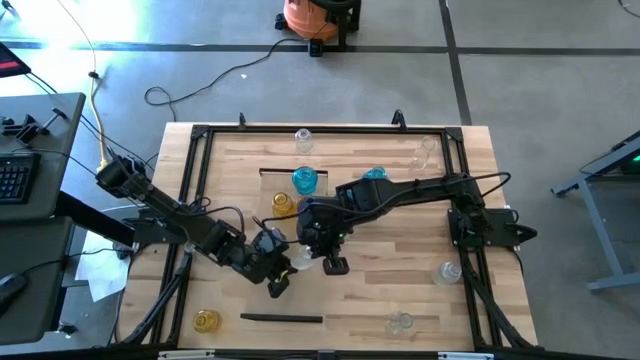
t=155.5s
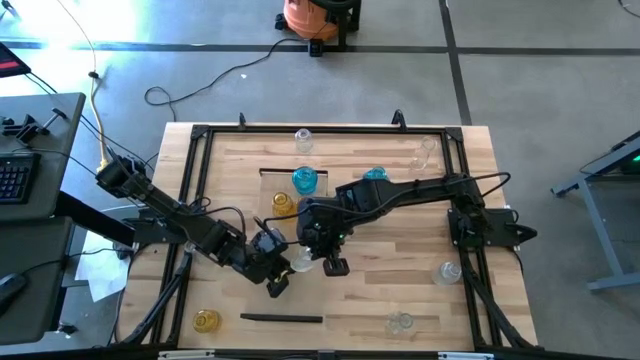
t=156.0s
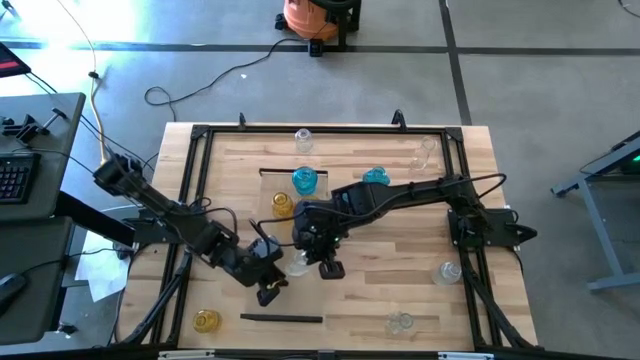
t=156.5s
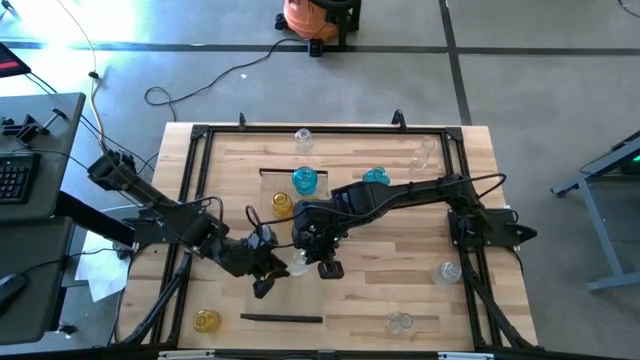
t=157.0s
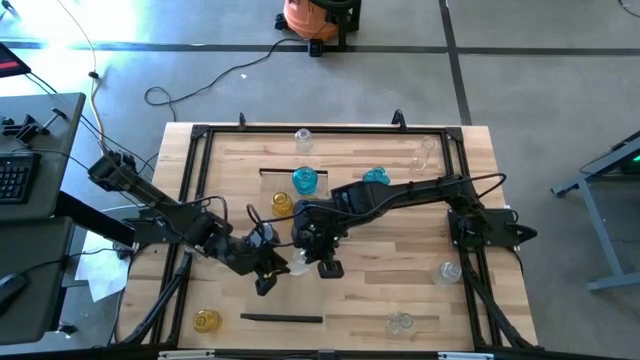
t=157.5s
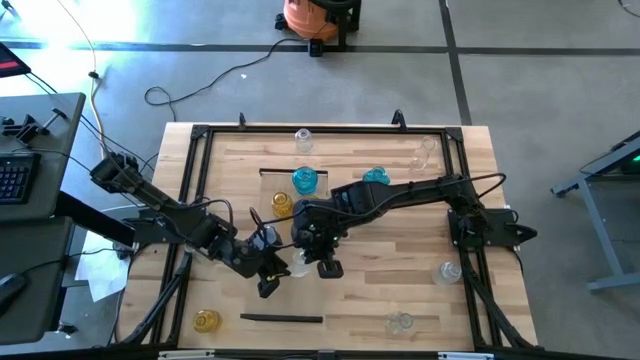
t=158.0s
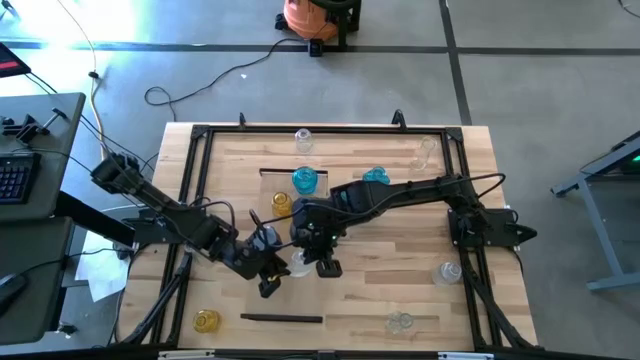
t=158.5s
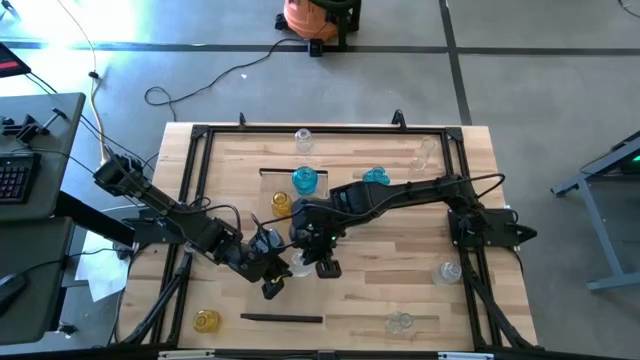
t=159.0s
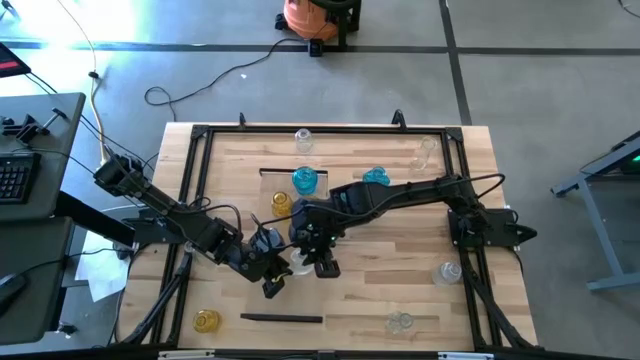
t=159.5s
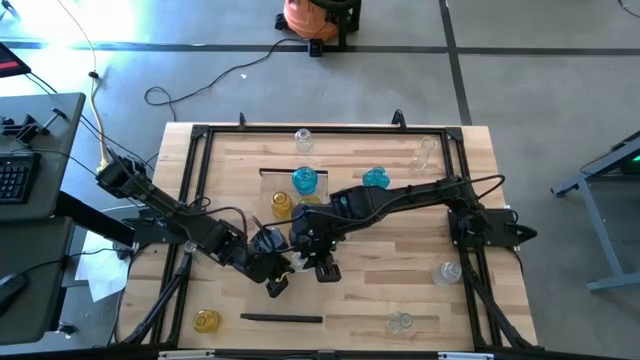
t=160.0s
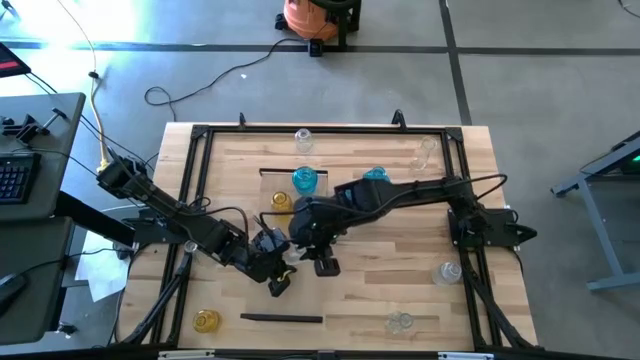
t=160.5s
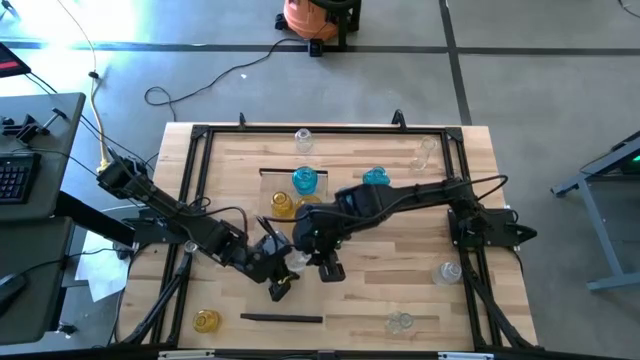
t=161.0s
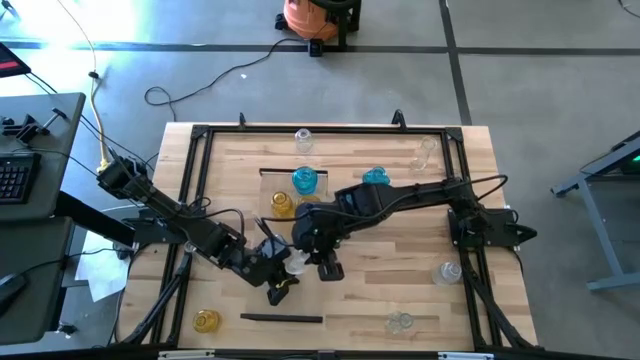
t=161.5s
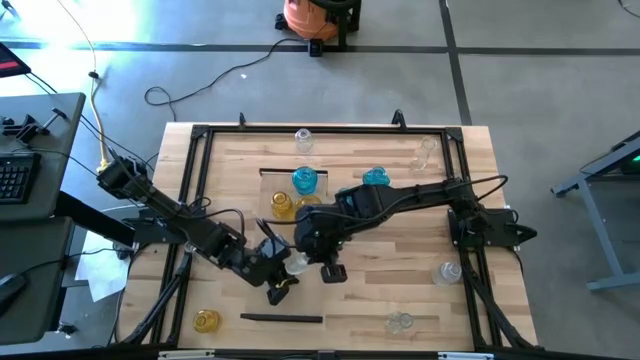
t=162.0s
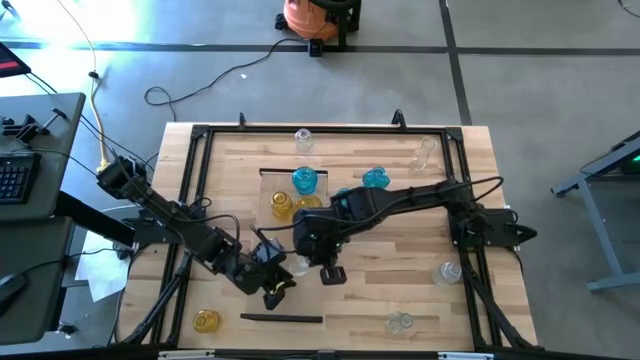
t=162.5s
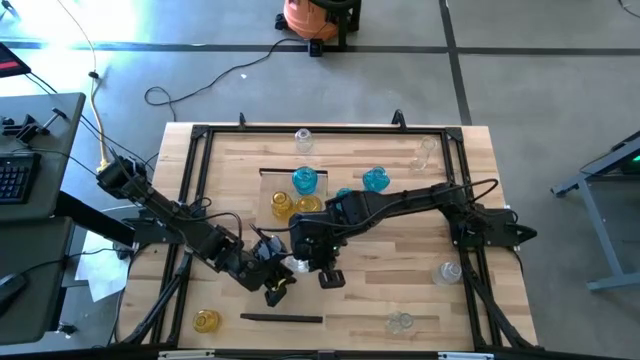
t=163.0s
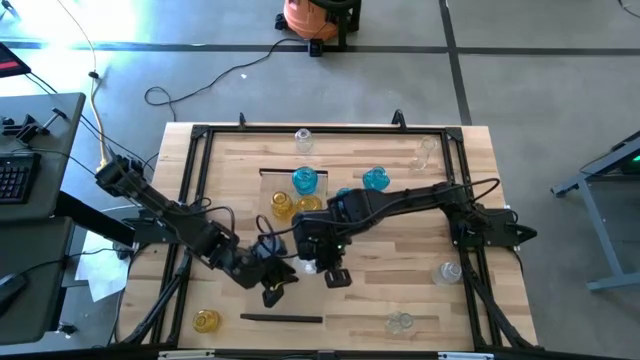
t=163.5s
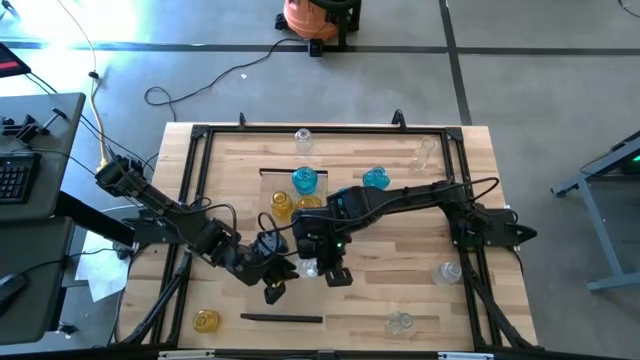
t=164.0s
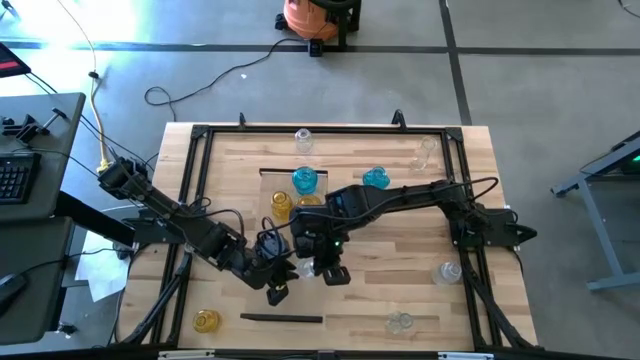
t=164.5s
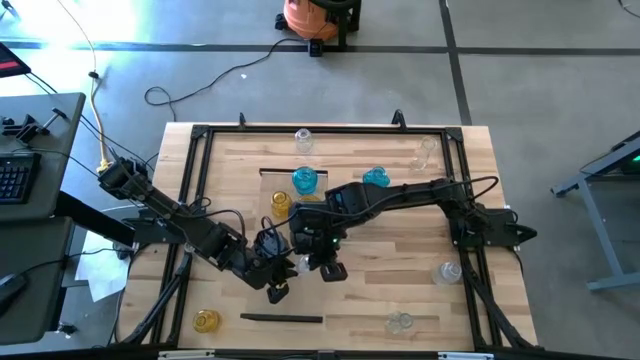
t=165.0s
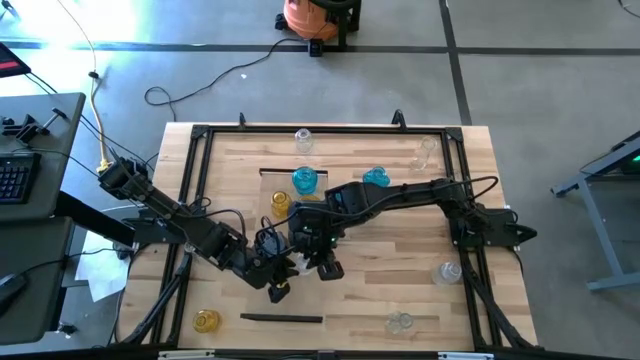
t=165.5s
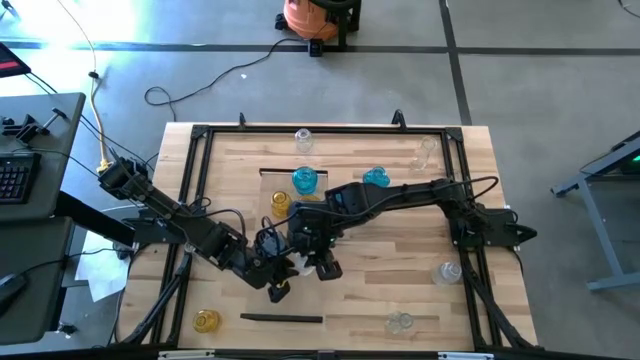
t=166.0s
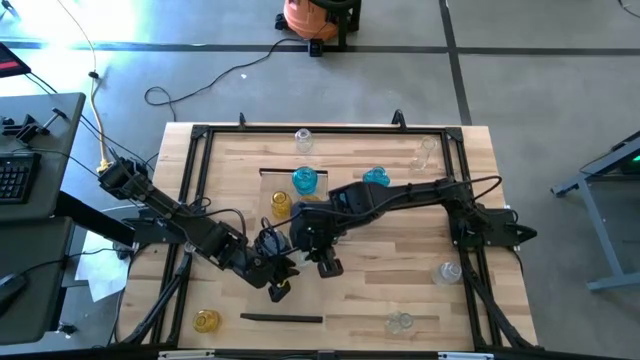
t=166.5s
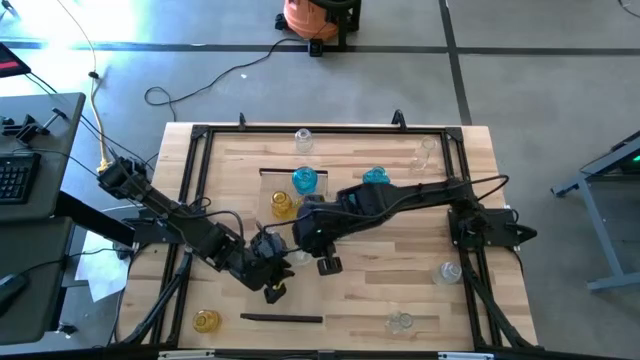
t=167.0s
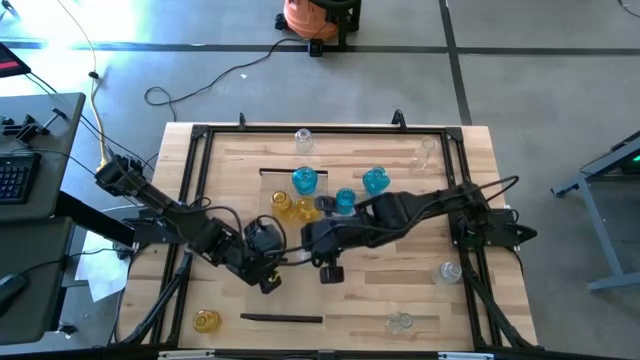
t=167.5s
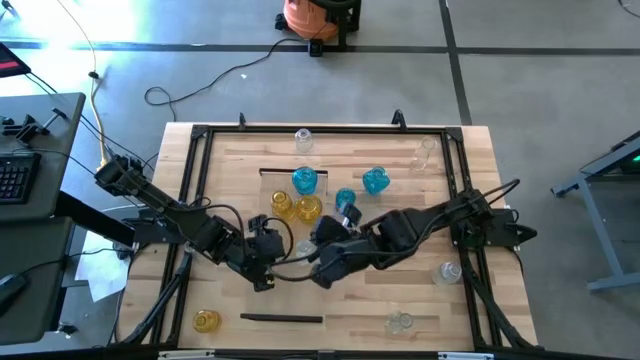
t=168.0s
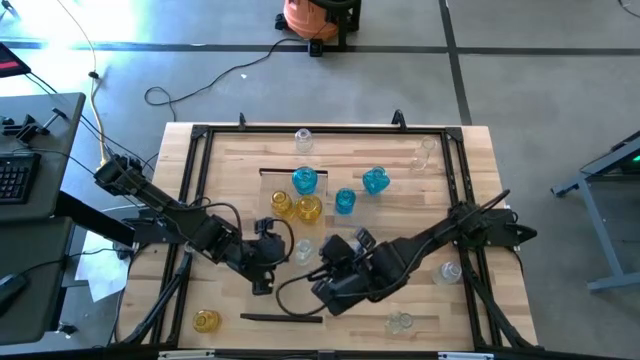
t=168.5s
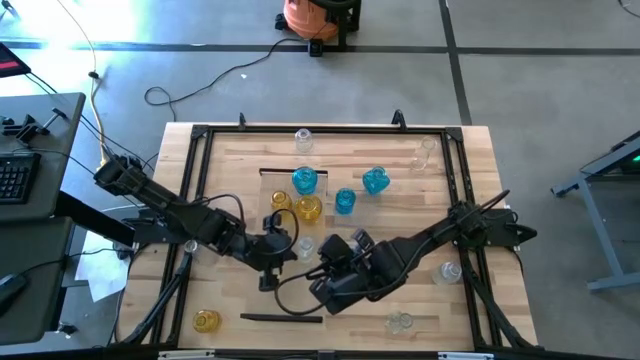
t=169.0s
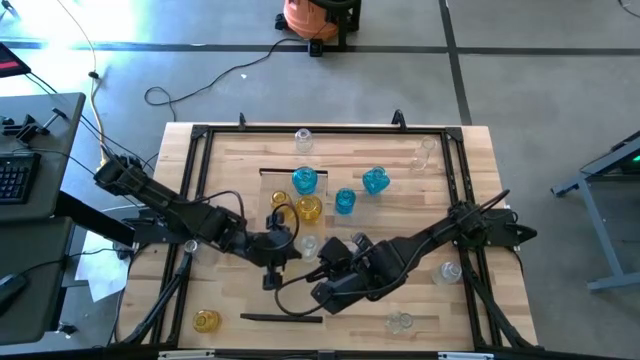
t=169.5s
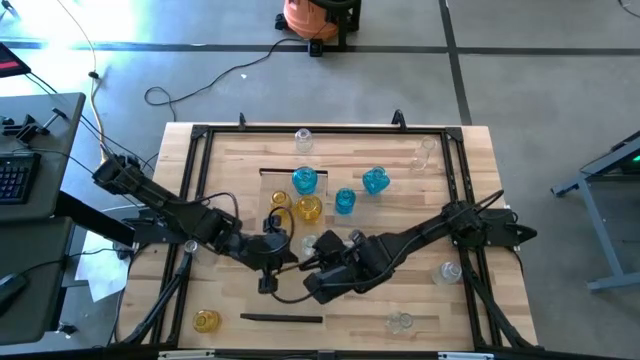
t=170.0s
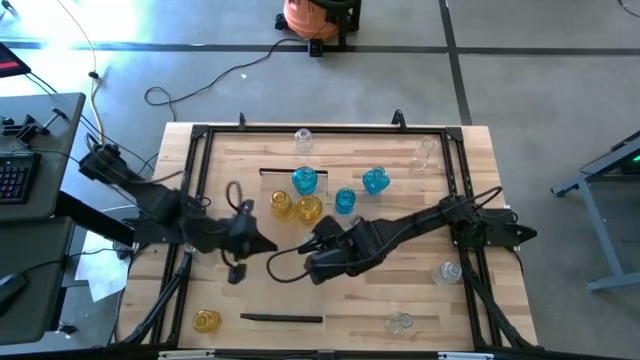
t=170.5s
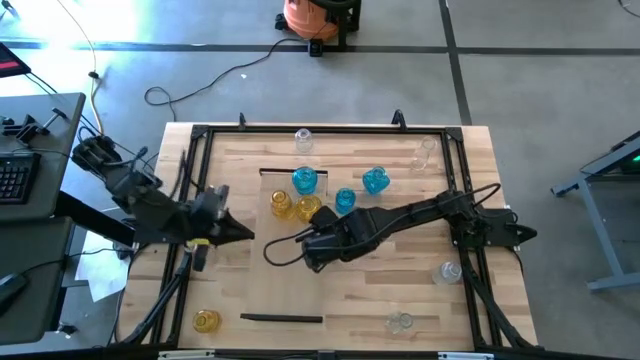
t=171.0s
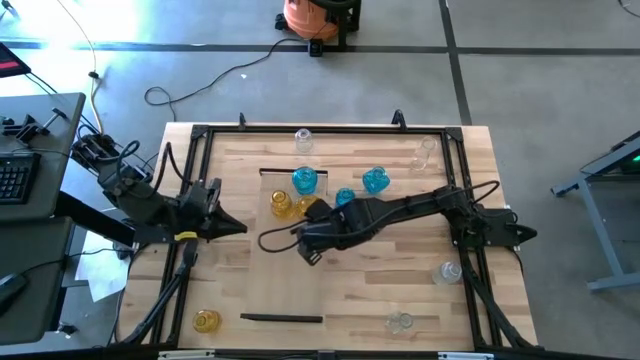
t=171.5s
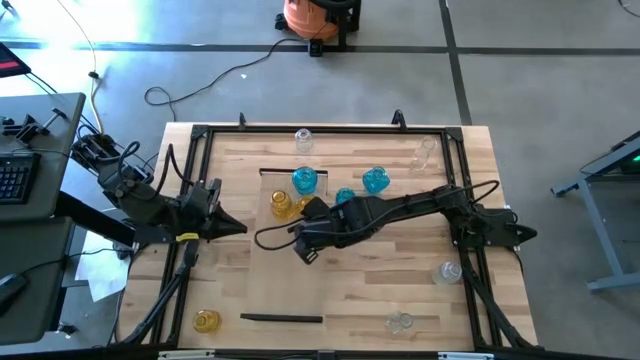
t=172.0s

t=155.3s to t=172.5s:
Task: sort vases onto shelf
Put the top middle transparent vase on the shelf

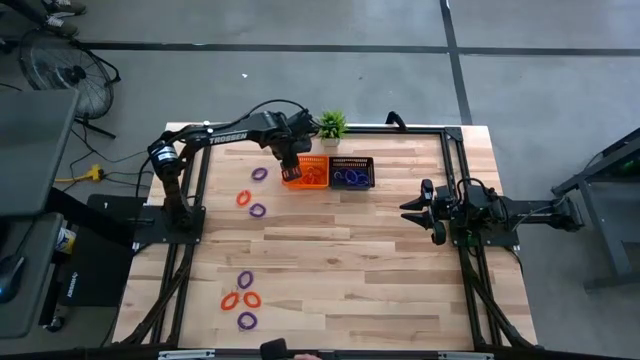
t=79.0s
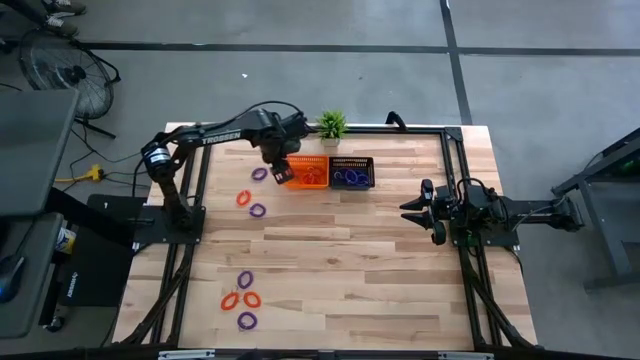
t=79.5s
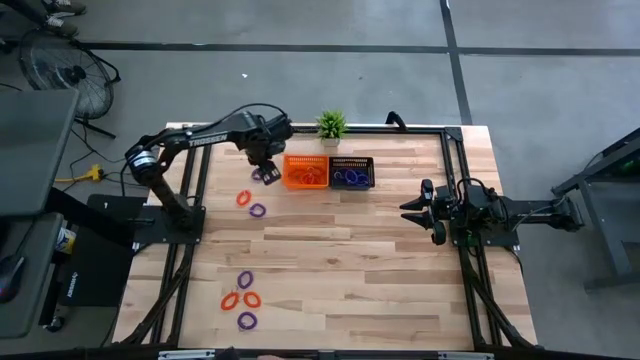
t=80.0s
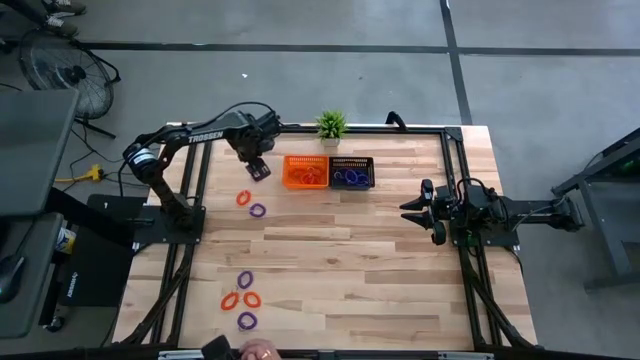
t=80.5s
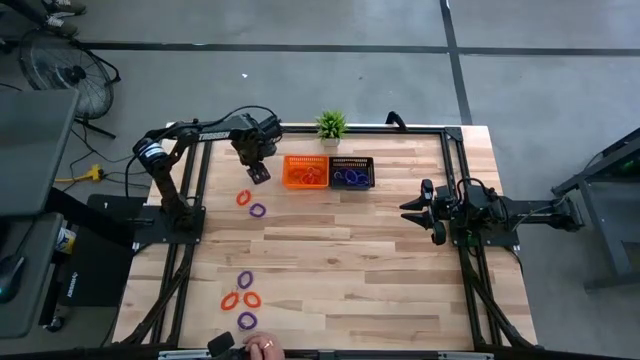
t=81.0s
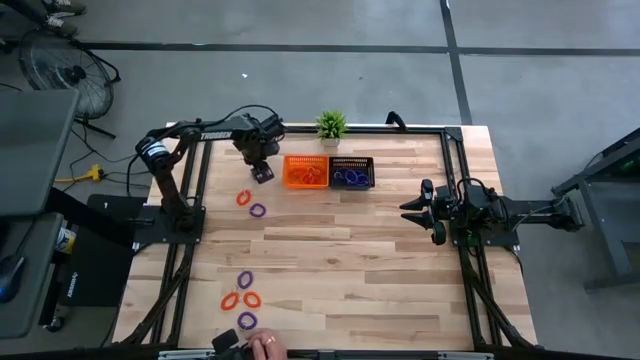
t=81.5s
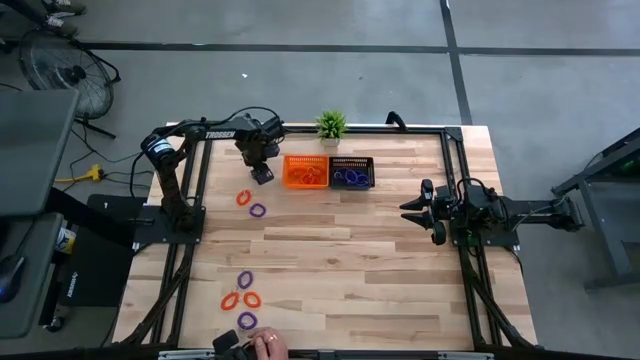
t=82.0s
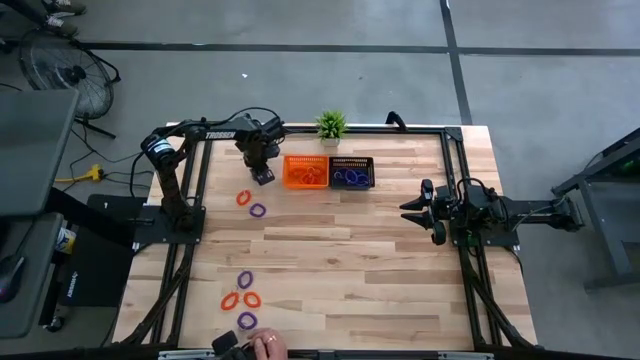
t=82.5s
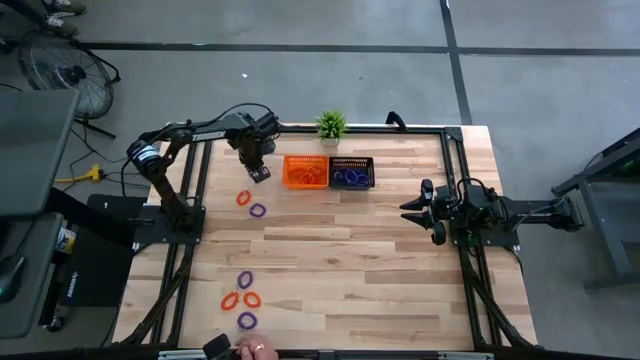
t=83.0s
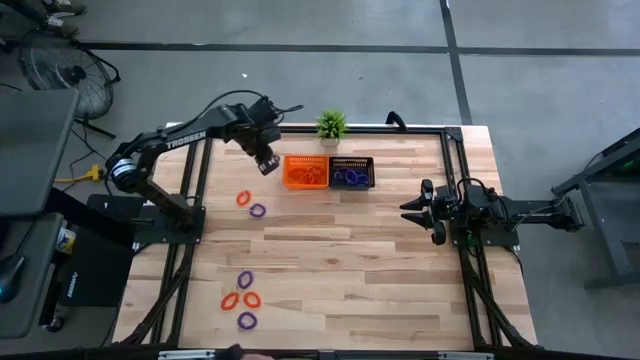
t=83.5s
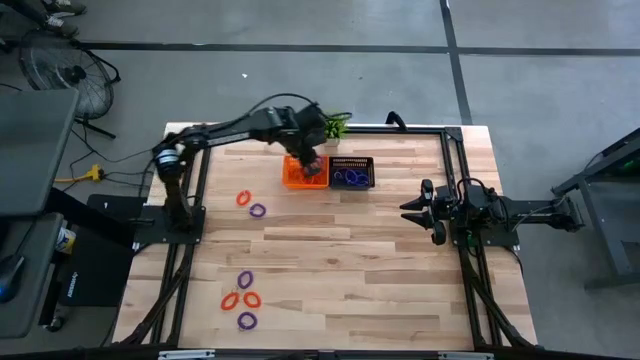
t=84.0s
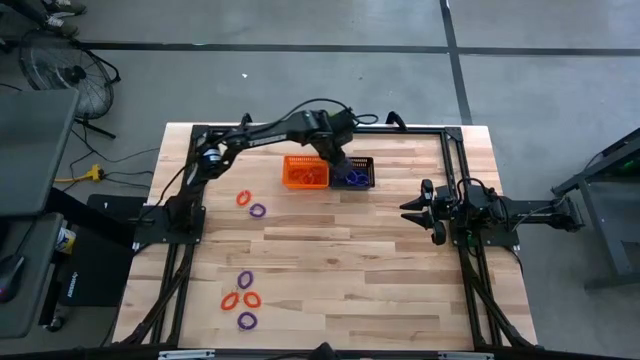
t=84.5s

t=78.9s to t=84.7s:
Task: Sort spring keychains into baskets
Put the purple spring keychain into the black basket
